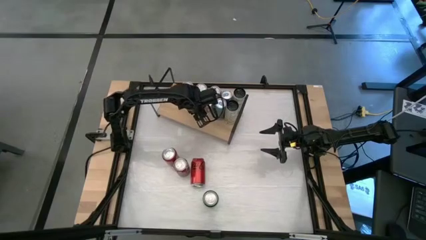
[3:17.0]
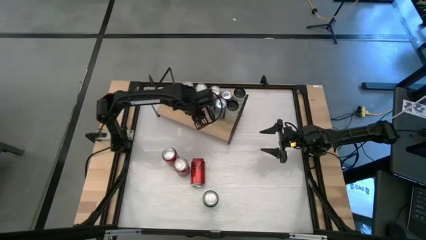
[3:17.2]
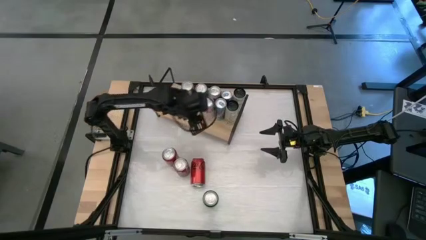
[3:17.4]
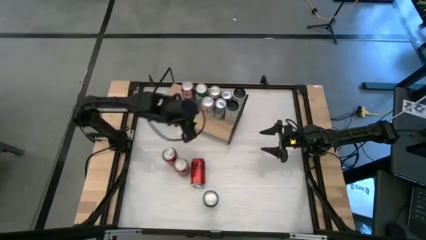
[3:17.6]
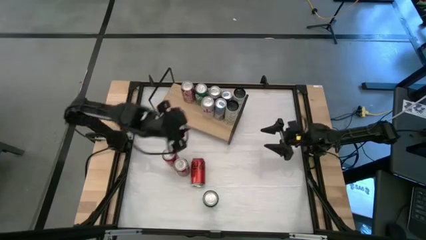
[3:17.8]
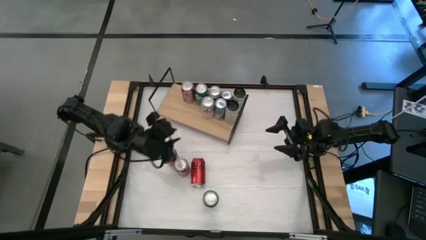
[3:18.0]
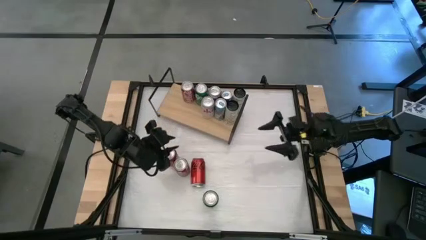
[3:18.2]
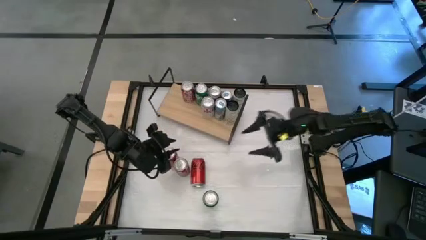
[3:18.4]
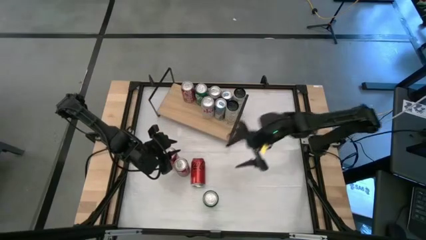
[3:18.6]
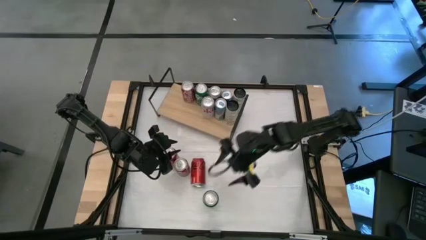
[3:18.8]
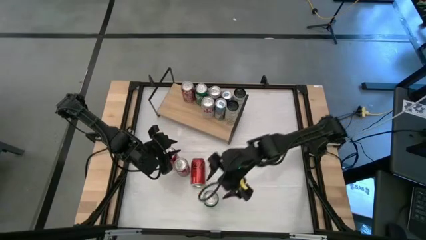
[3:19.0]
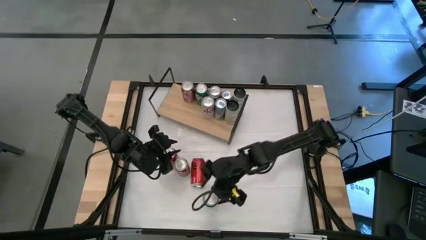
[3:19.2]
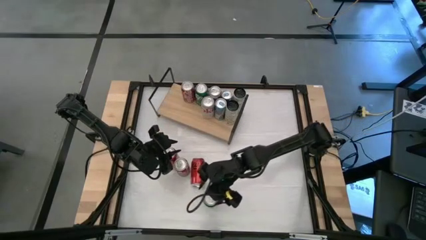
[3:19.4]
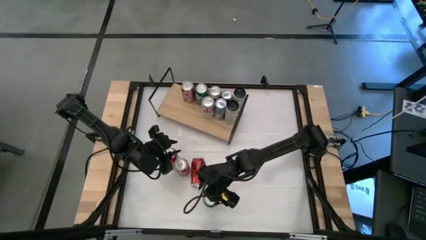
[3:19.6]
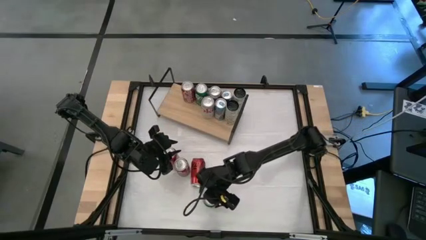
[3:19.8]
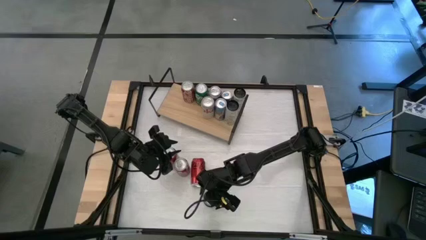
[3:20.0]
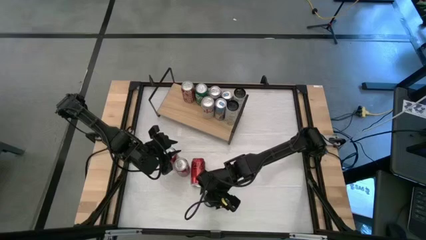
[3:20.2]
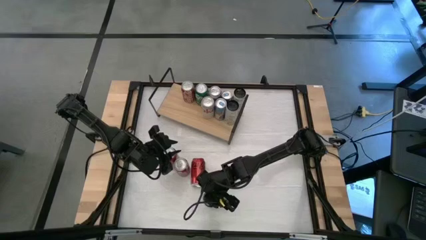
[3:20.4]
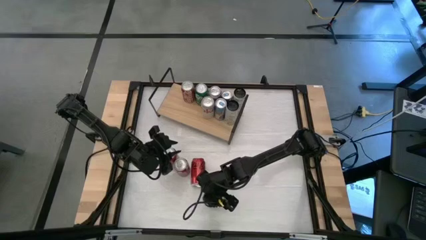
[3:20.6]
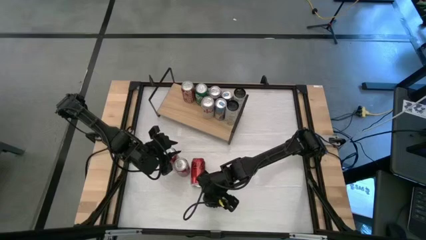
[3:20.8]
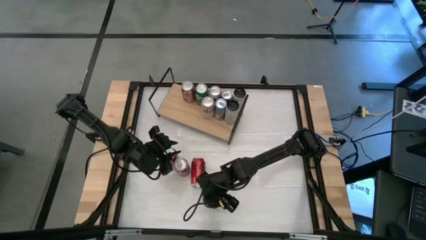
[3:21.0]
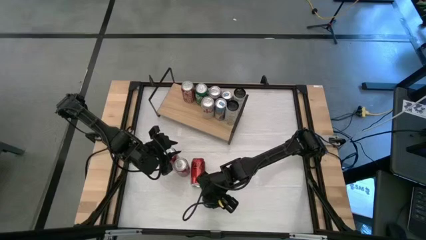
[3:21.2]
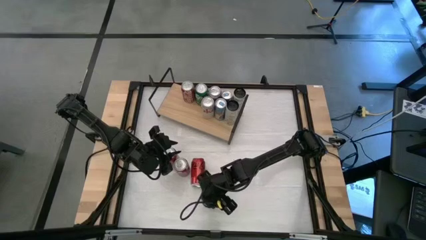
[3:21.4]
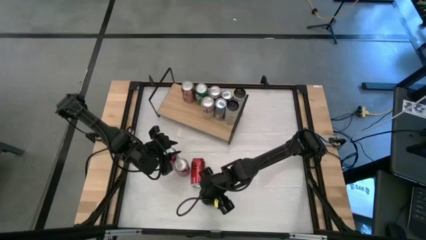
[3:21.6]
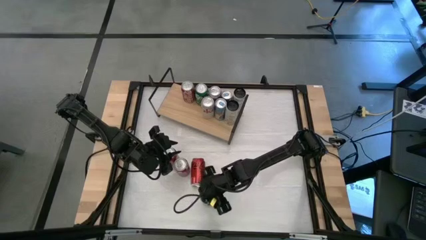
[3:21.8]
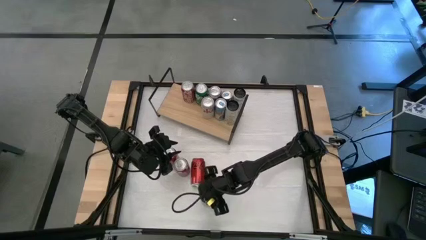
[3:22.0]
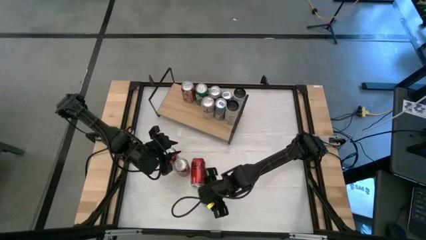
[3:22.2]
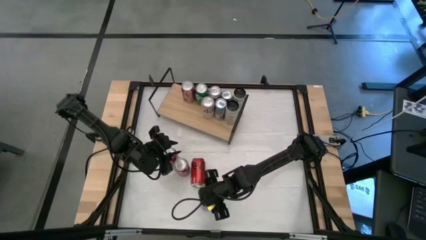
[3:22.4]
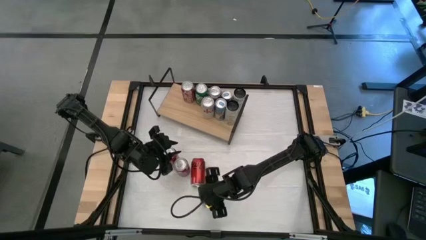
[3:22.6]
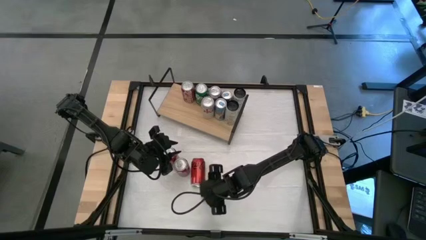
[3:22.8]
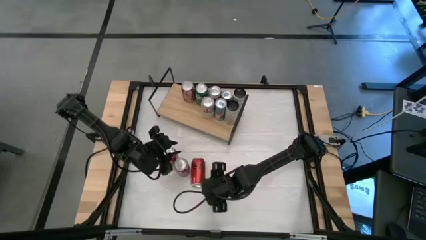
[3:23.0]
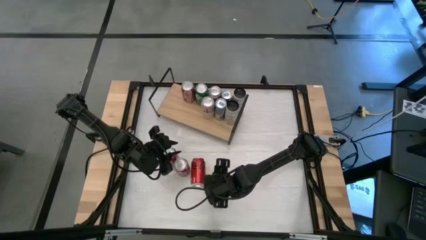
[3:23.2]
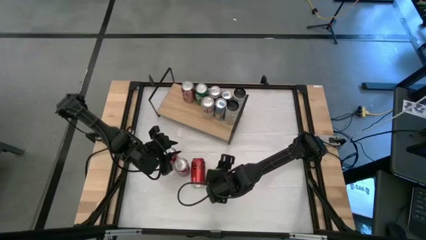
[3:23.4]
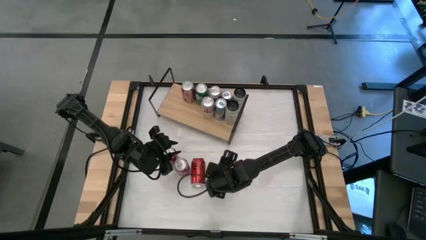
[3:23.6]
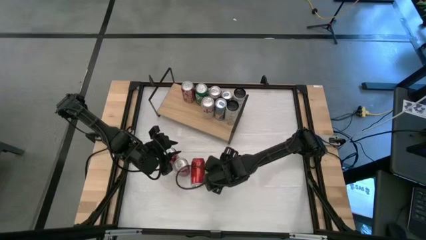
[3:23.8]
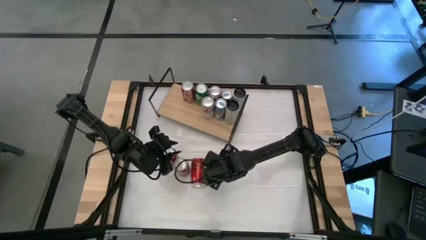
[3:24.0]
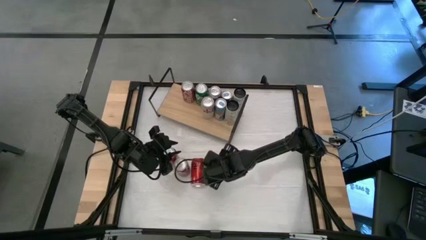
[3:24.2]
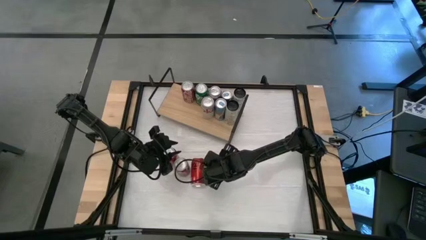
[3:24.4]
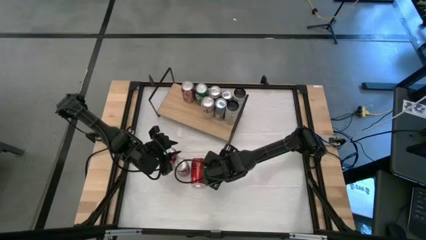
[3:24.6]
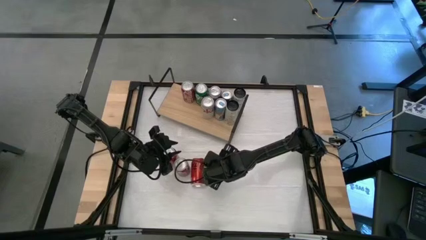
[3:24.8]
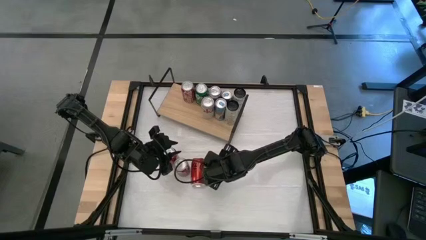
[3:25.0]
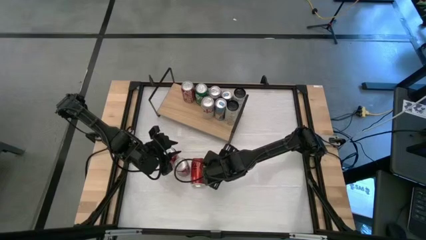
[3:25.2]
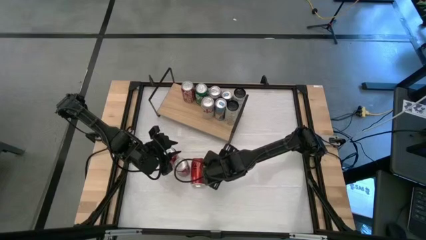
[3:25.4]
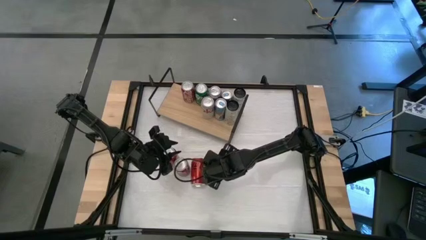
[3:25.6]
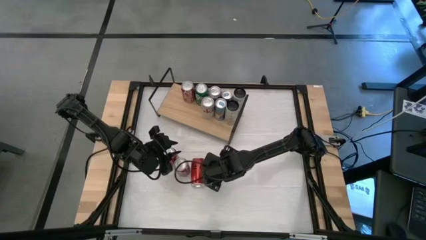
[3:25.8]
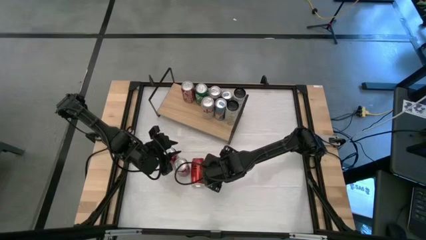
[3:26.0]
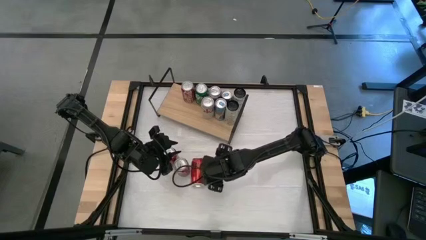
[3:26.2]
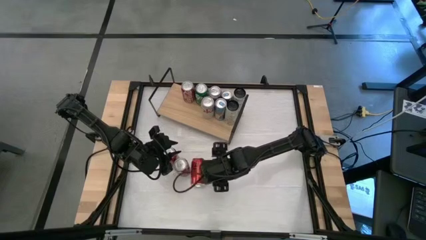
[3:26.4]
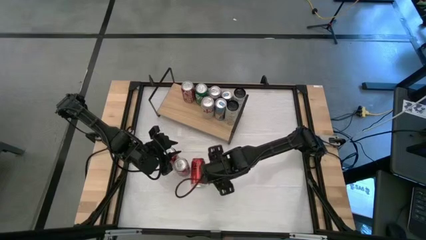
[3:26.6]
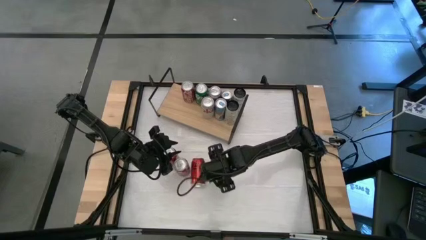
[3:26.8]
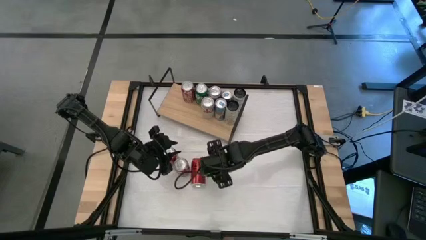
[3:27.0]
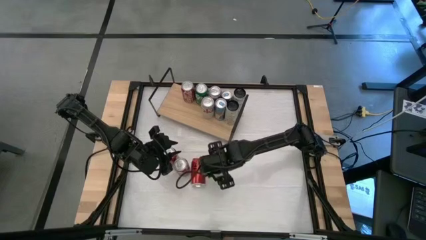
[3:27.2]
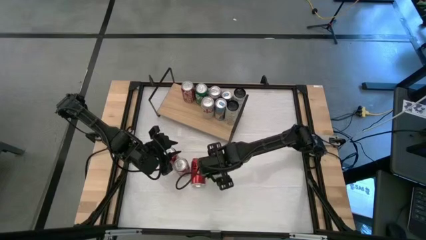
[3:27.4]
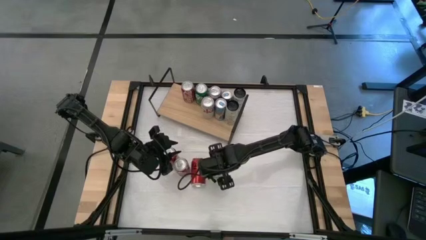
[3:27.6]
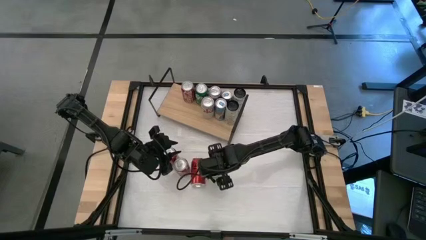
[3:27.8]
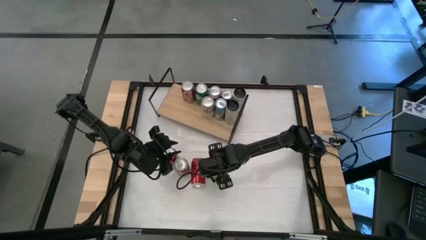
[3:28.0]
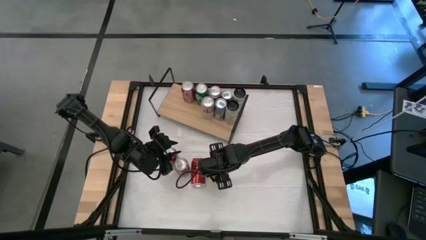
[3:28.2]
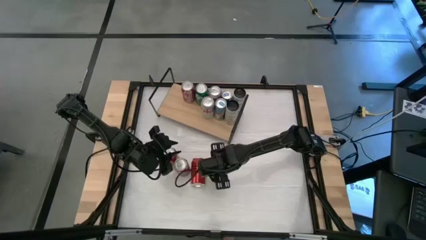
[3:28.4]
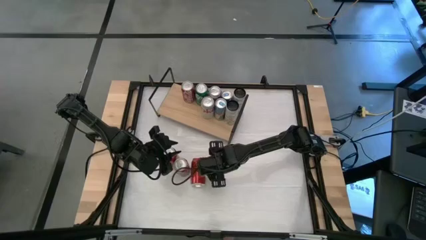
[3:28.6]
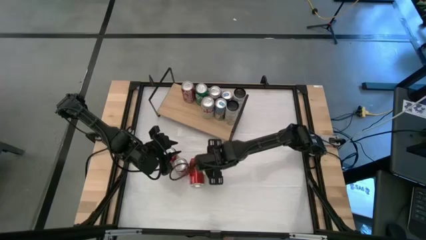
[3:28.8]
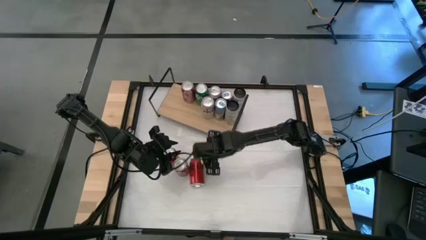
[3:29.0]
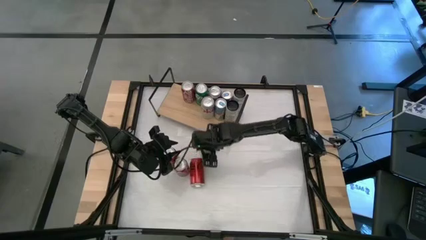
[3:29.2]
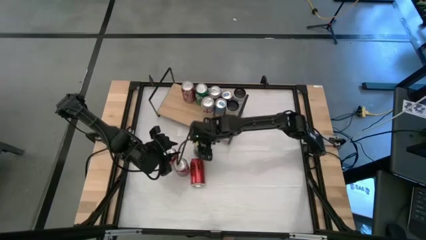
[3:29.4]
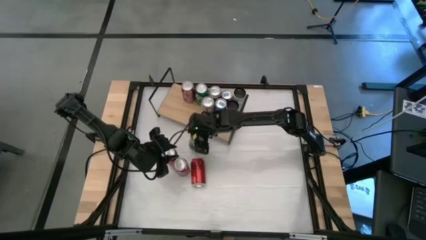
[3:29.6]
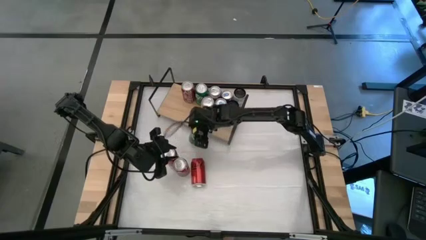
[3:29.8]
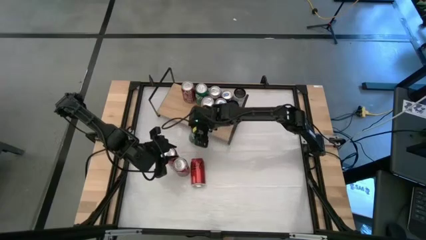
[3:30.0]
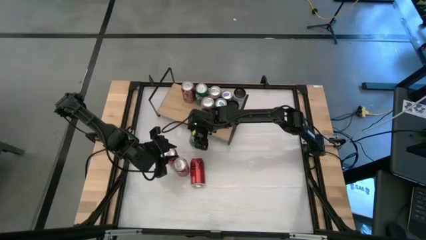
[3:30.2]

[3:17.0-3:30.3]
Task: Place canned beverage on shelf
Put the green soda can on the shelf aligned with the other green soda can

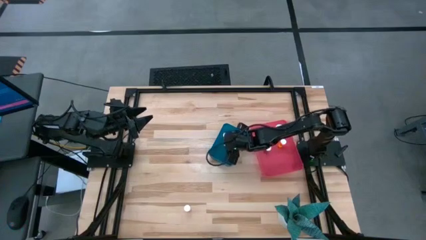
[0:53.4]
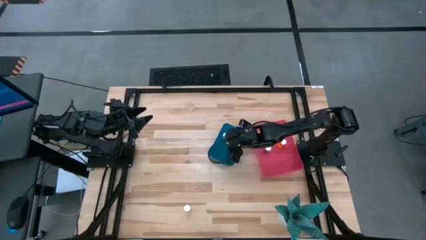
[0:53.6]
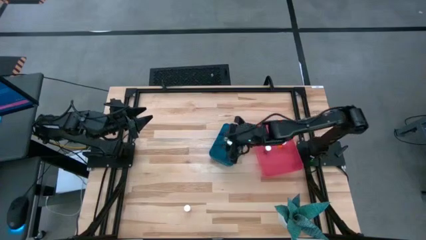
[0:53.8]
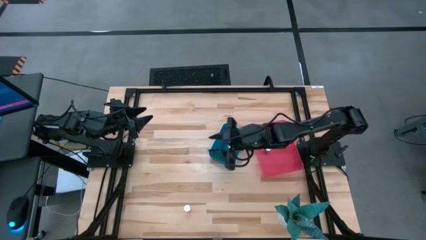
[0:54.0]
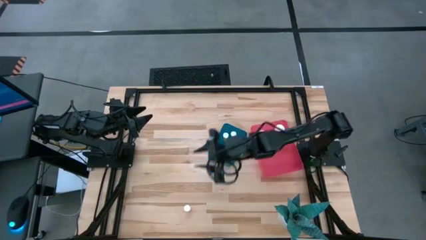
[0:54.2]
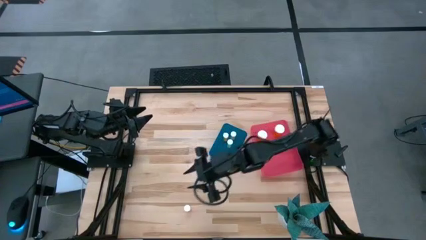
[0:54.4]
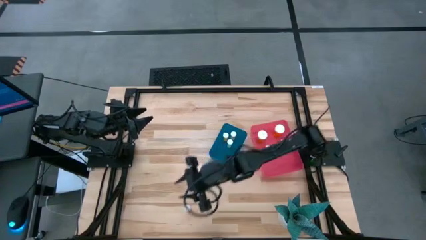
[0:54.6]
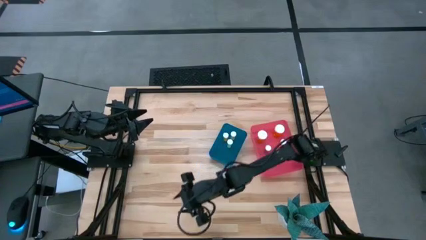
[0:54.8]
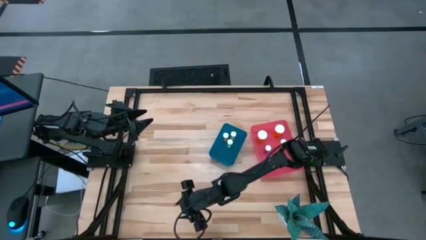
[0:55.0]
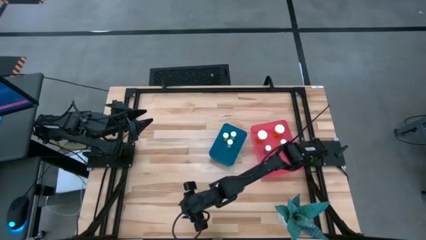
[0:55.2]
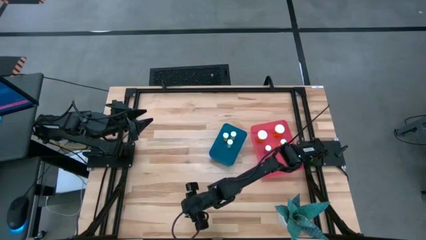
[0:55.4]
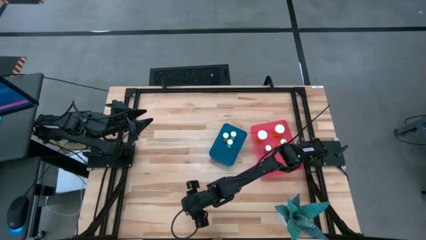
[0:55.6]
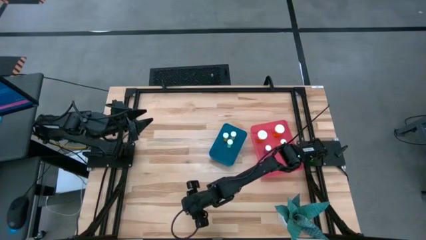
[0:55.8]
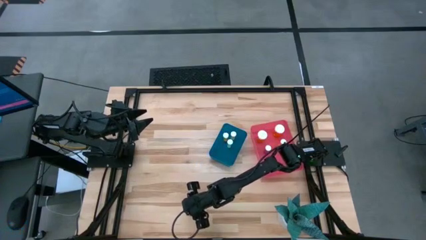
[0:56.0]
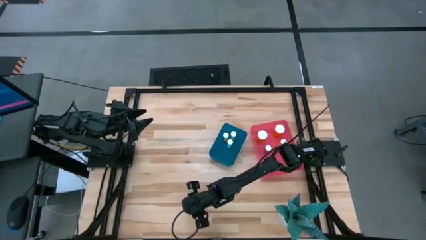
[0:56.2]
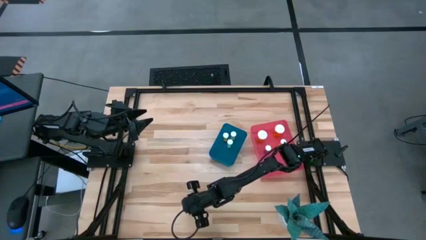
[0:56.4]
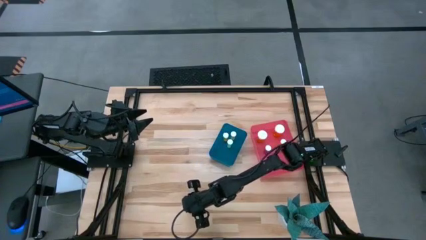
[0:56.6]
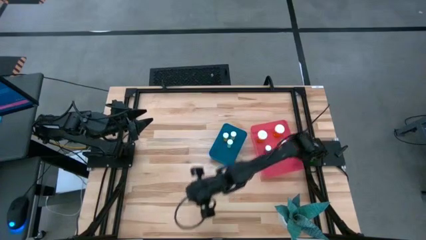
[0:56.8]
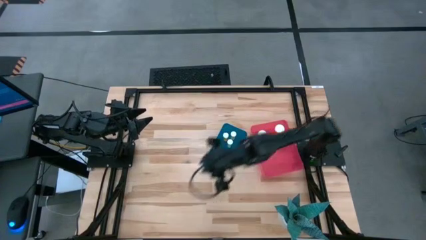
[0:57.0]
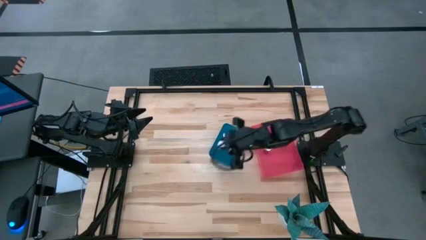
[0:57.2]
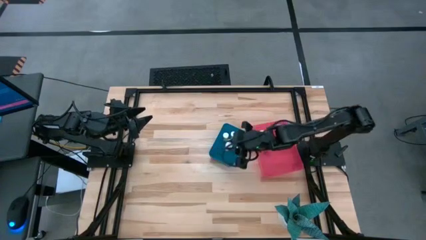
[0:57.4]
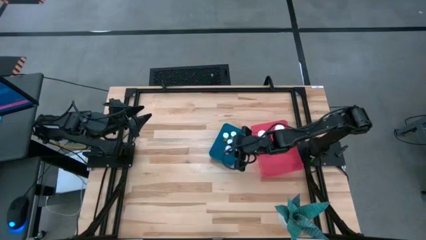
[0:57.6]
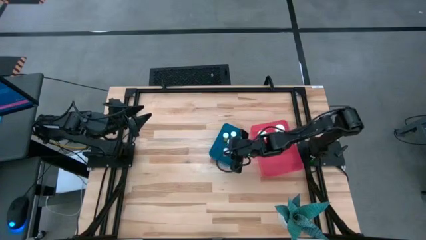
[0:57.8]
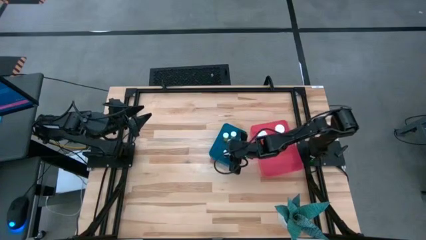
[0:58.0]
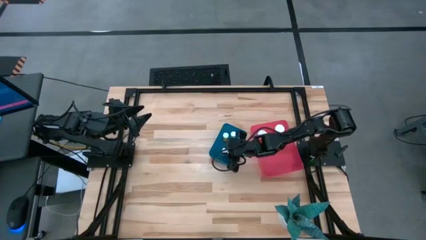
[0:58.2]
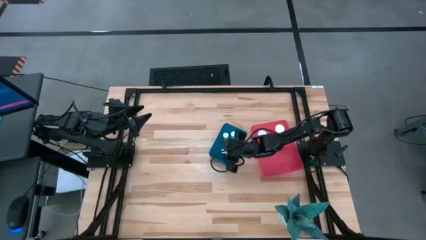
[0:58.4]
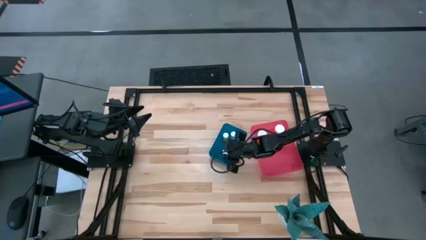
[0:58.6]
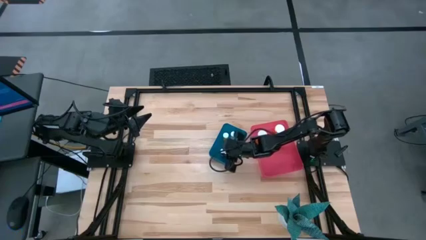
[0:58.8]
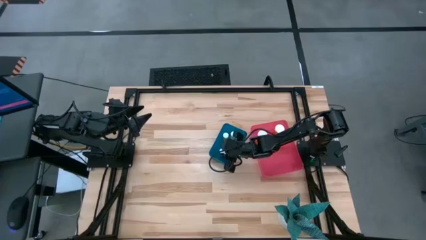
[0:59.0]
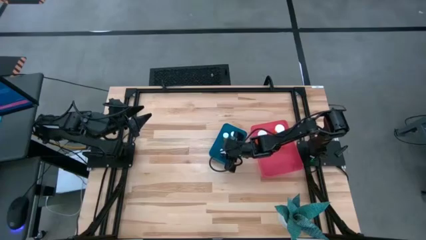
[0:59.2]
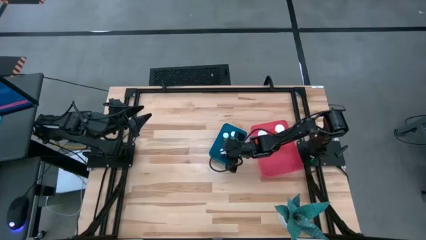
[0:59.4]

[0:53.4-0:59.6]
Task: Pick and place medicine bottles into bin by pill shape (circle, oval)
Put the pink tablet bottle into the blue bin
